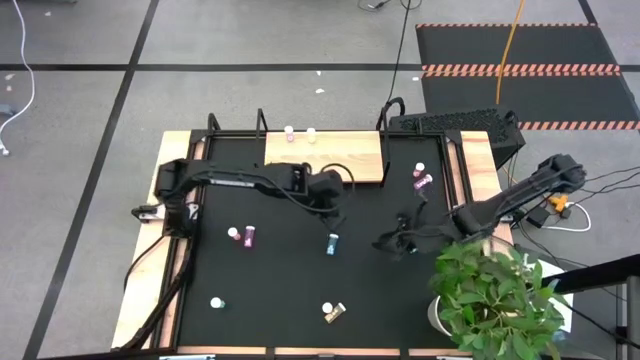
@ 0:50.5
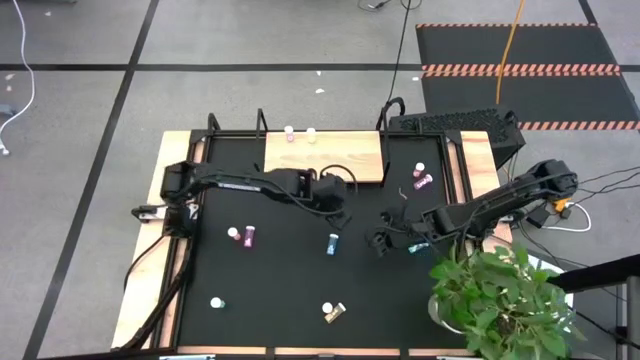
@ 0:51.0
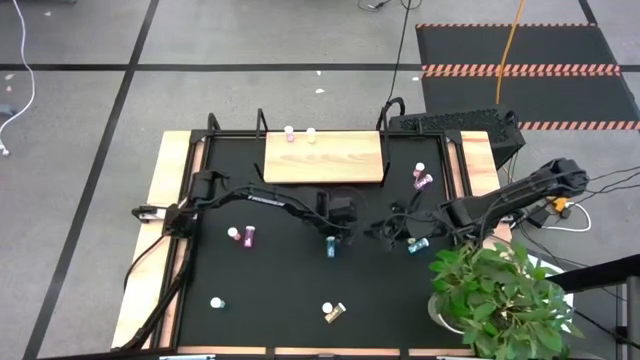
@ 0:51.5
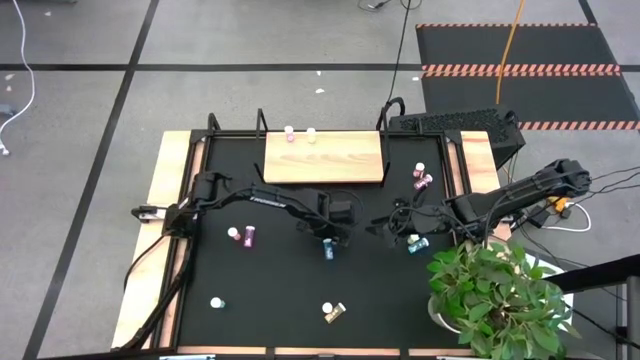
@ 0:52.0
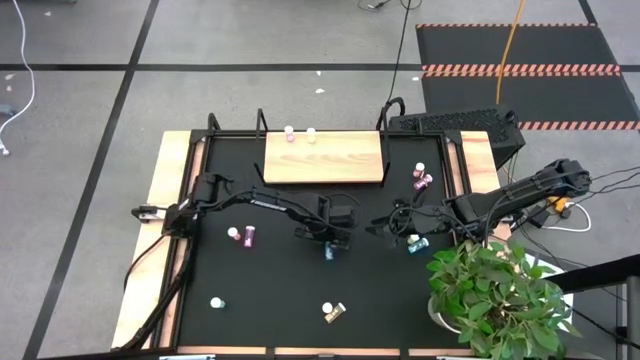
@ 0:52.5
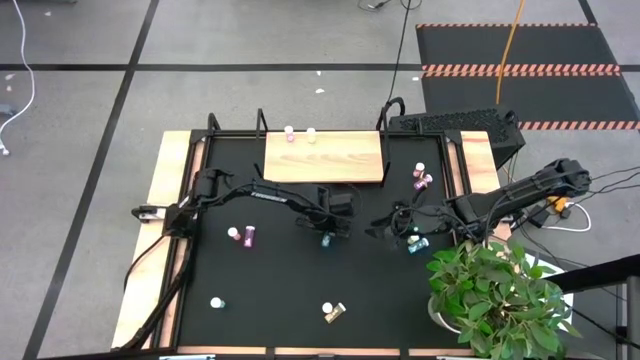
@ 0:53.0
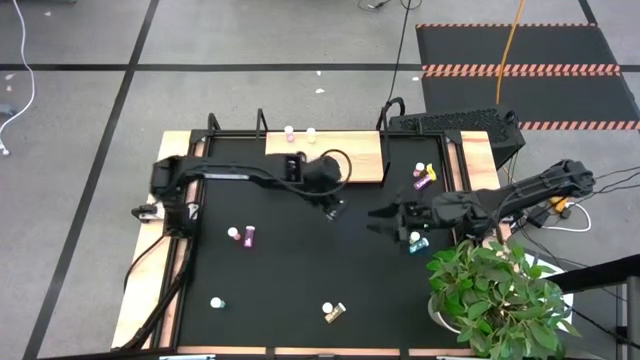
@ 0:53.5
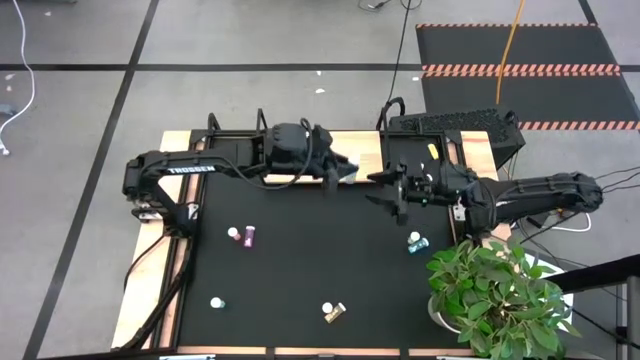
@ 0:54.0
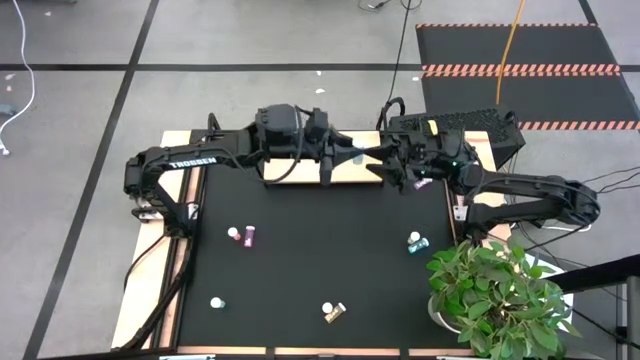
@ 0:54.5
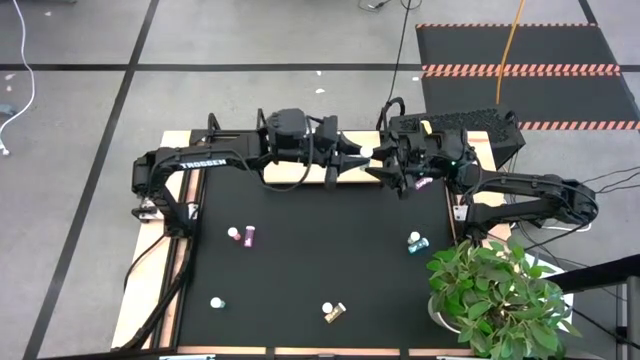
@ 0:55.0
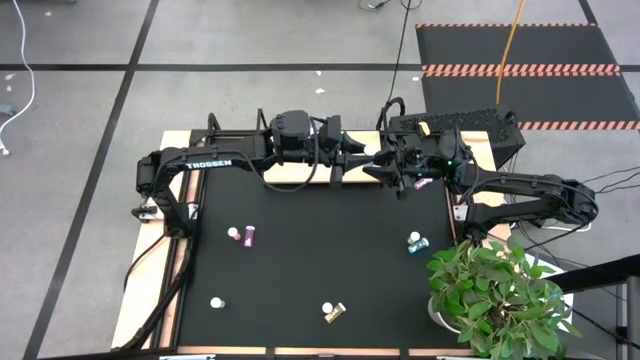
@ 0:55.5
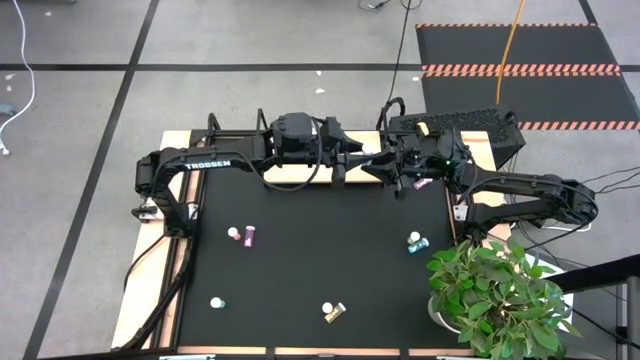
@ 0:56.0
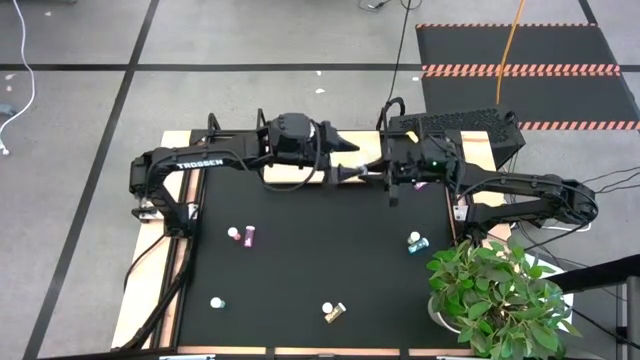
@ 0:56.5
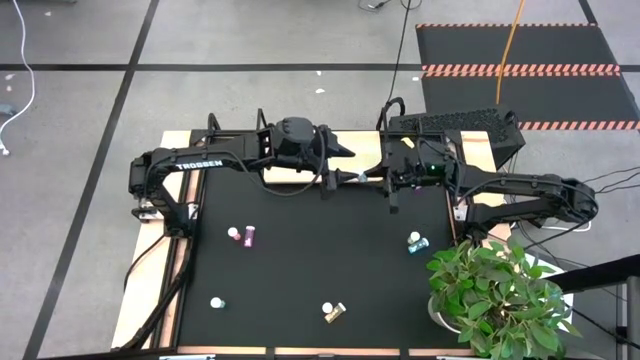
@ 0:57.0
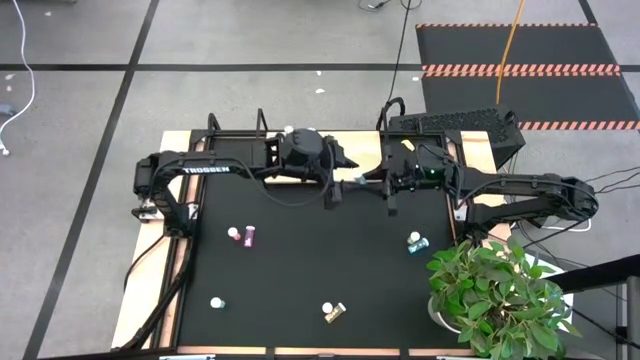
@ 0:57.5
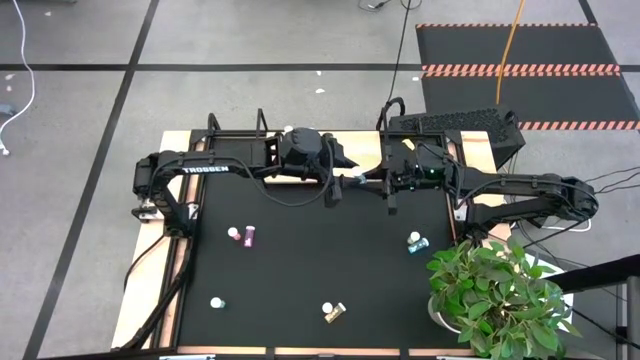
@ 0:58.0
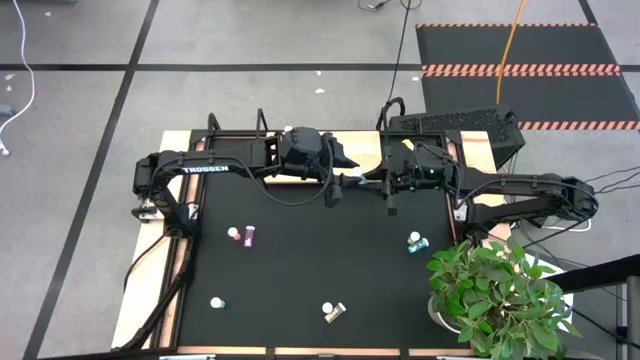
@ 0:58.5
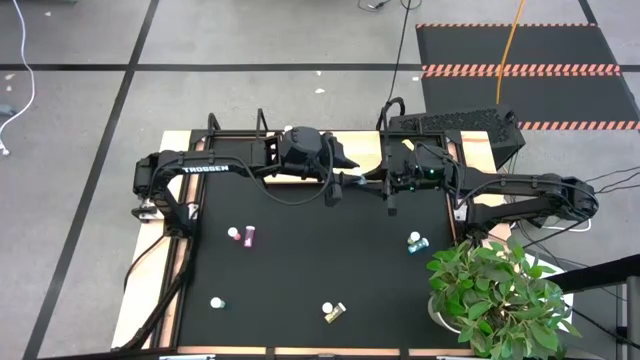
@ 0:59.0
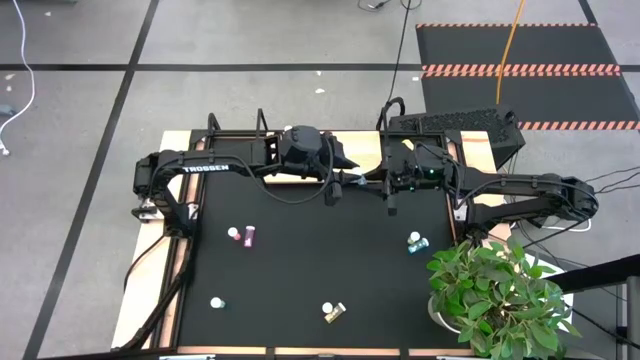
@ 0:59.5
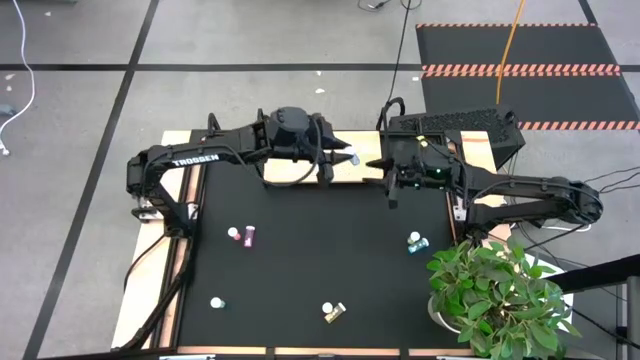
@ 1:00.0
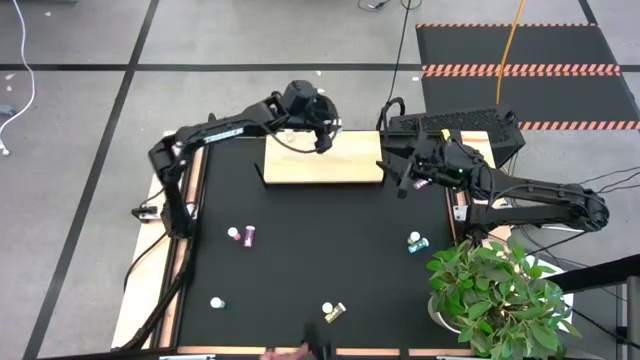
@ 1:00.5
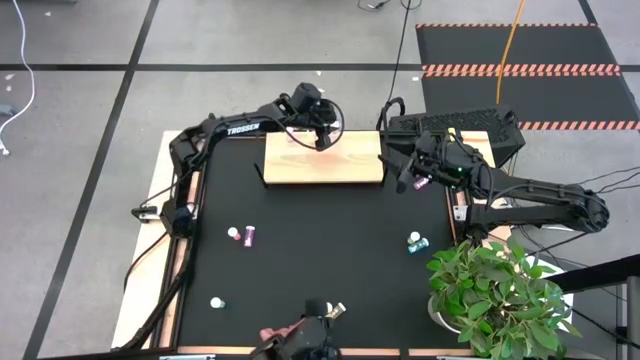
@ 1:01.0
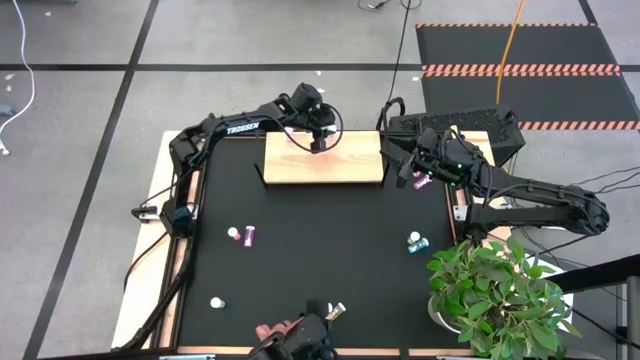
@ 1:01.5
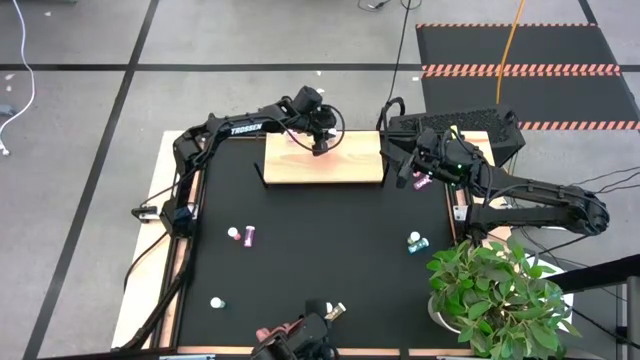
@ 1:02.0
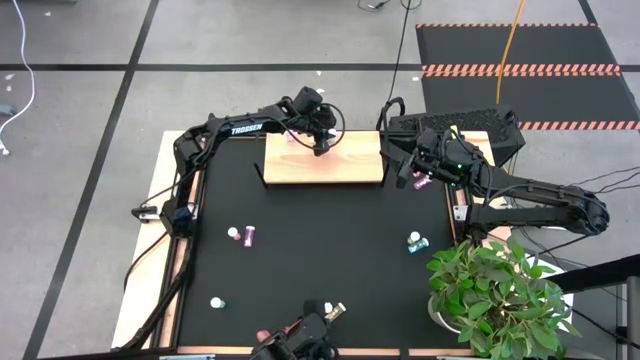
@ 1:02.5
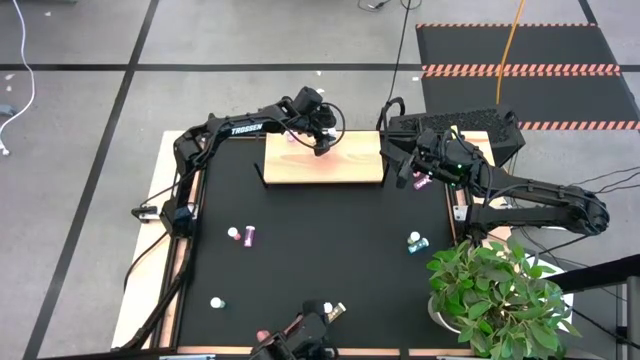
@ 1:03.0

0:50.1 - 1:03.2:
Task: Pick and place medicine bottles onto shelf by color
Put the left blue pill bottle on the shelf
